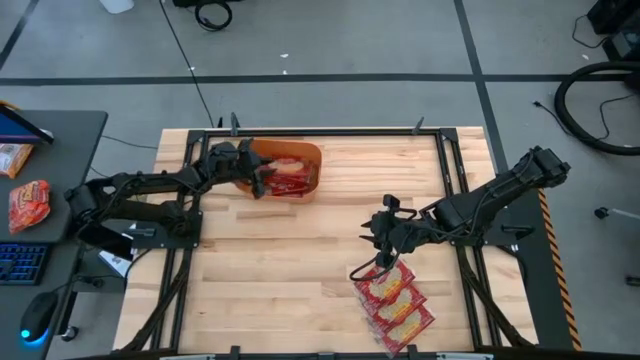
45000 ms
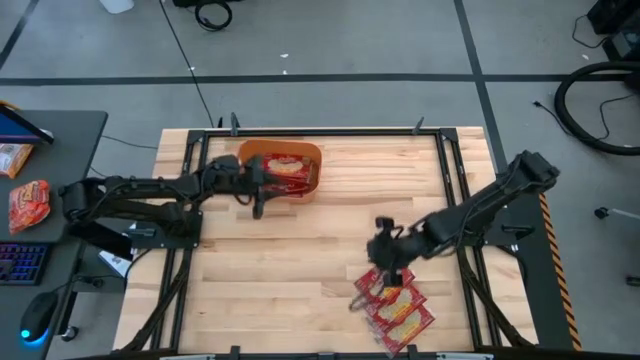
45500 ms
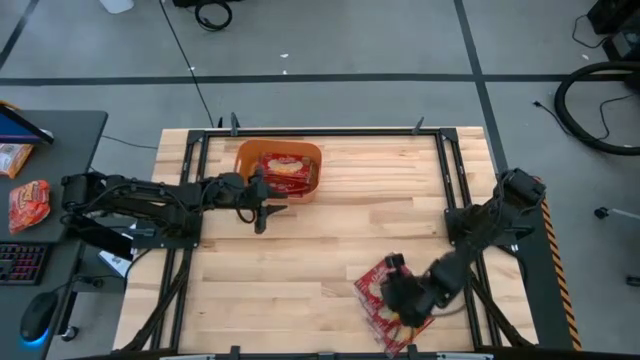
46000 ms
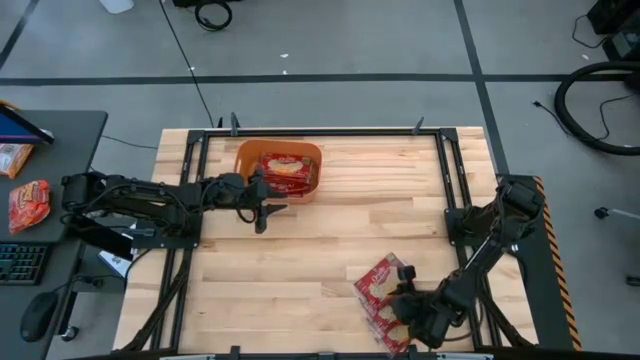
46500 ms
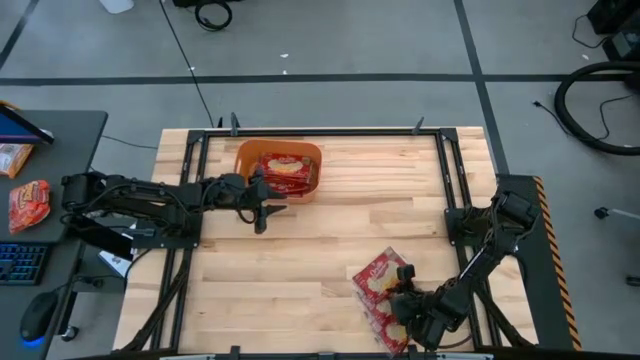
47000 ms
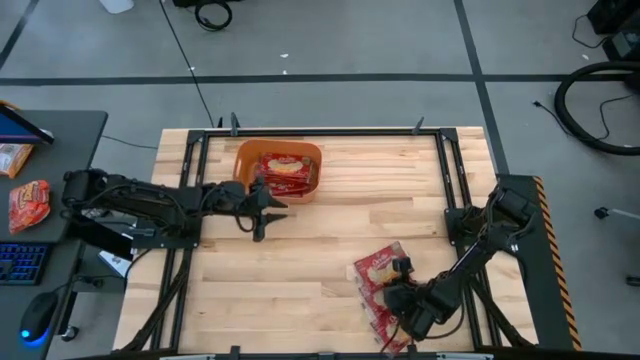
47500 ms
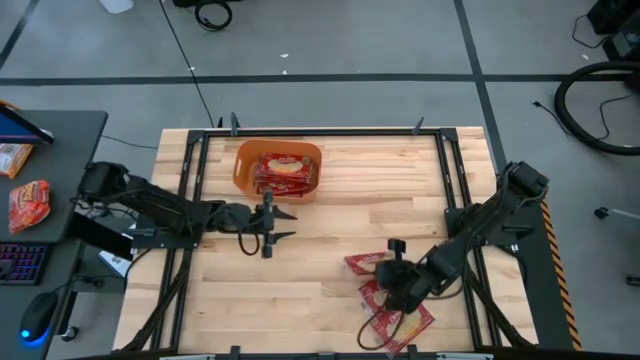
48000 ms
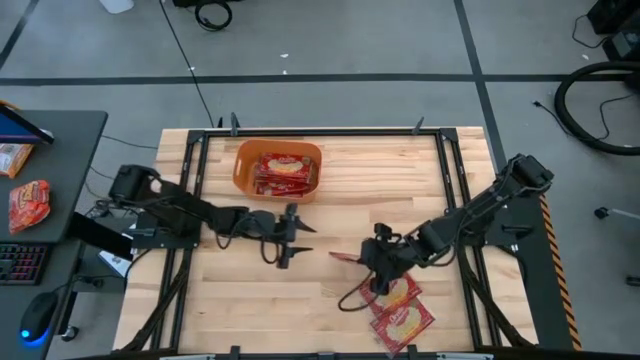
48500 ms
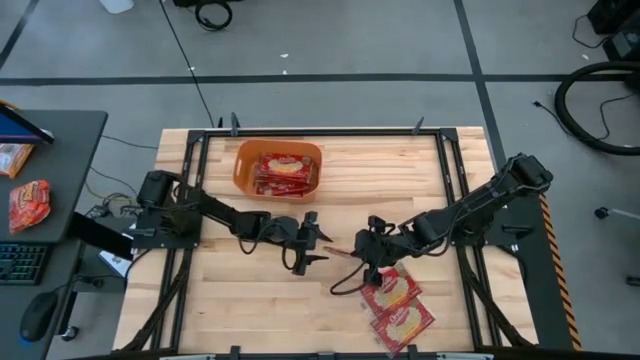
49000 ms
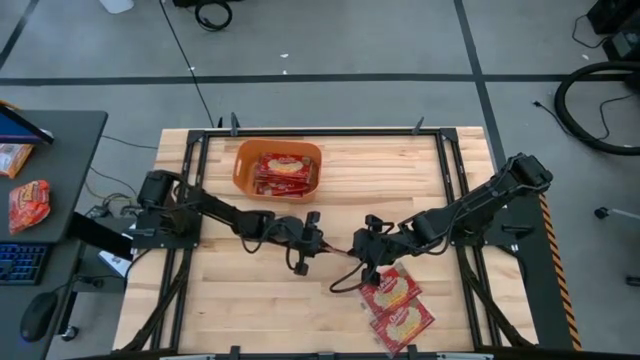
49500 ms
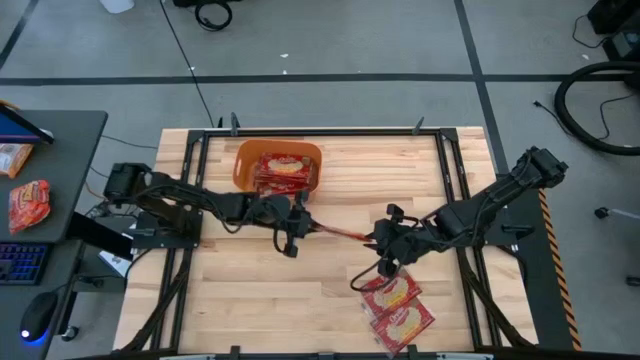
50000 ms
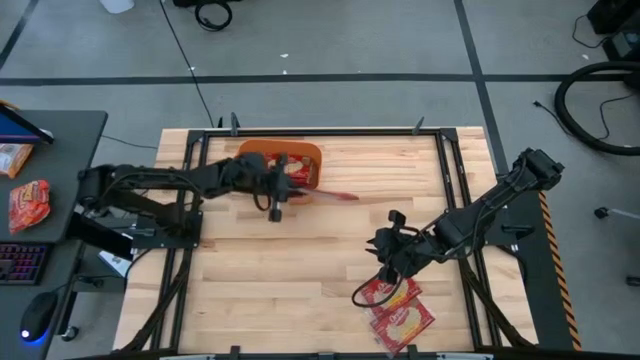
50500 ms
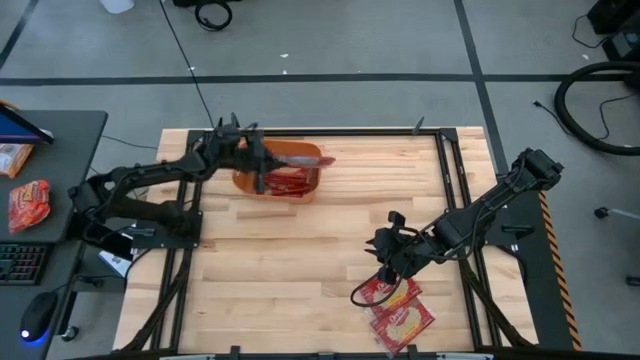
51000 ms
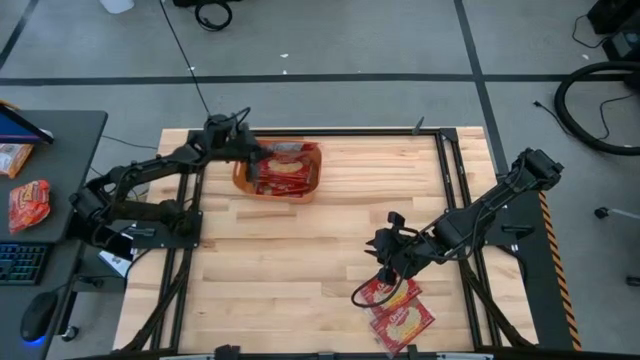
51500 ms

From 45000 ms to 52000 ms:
Task: Sort popcorn bags into baskets
Put the popcorn bag into the orange bin

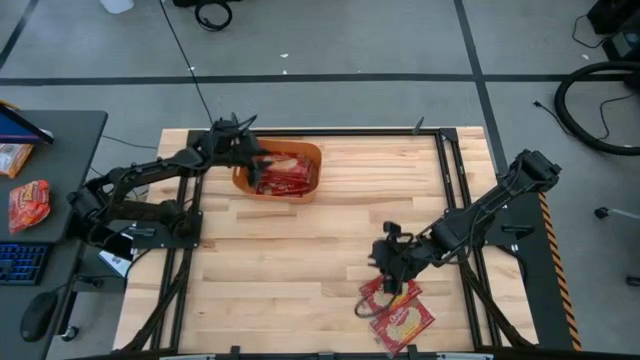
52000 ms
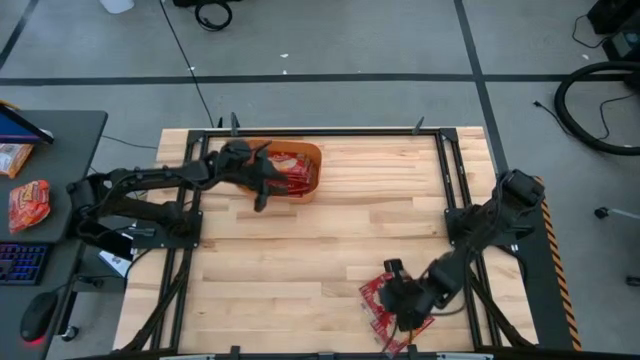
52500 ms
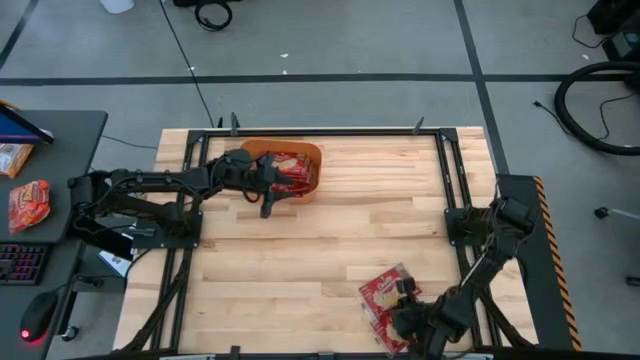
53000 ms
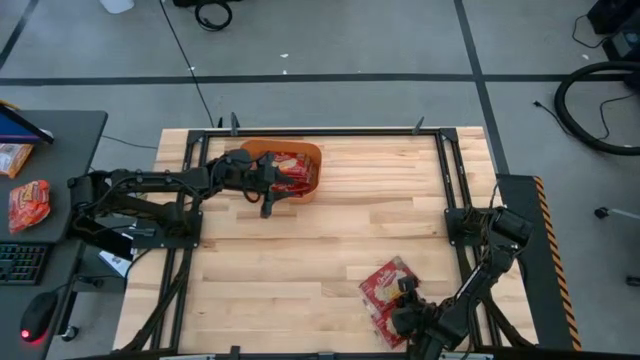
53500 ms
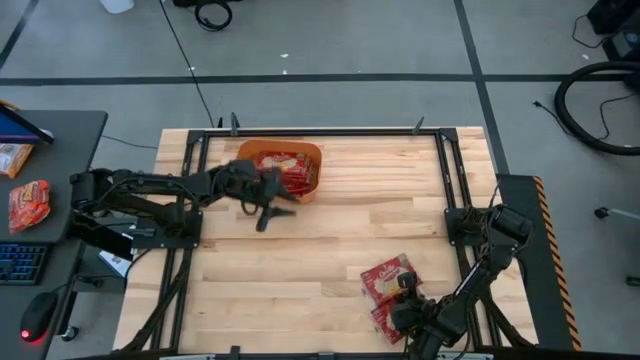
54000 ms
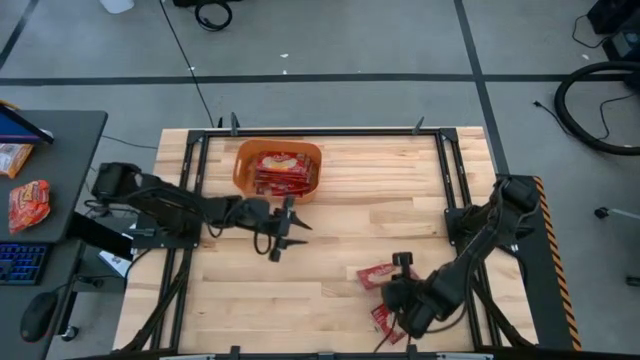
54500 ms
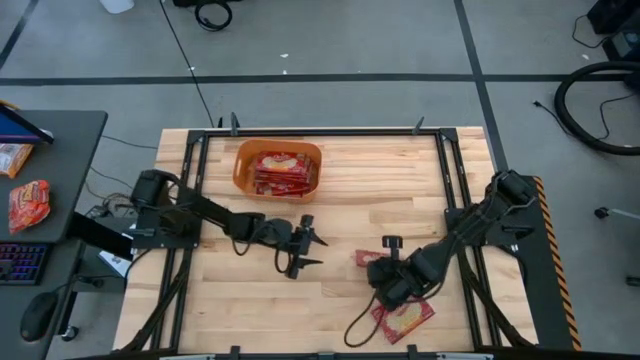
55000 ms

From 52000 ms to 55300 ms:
Put the popcorn bag into the orange bin

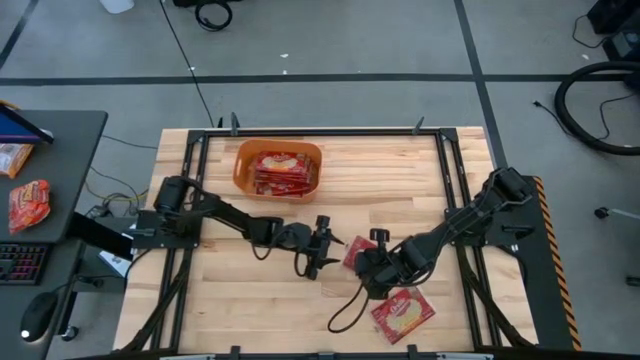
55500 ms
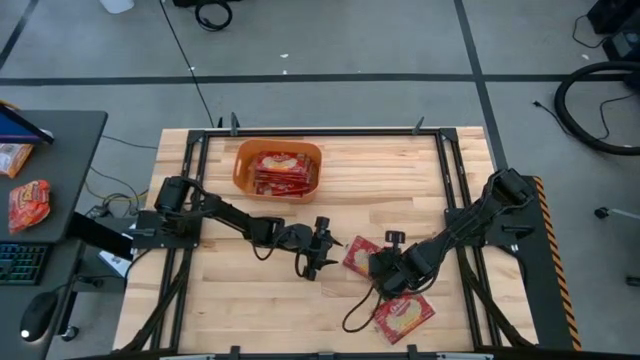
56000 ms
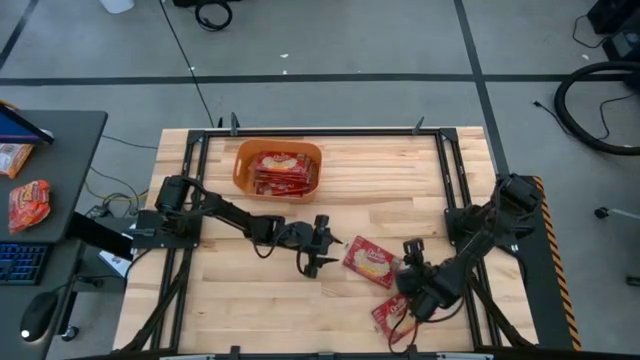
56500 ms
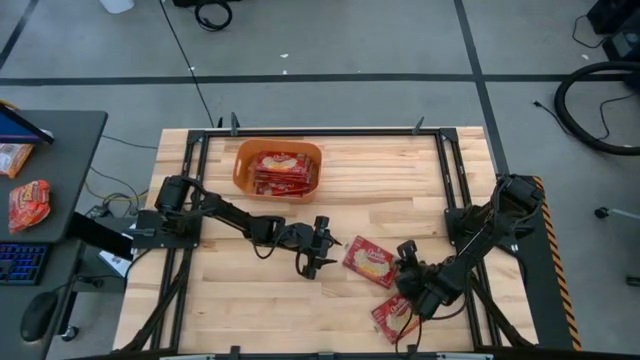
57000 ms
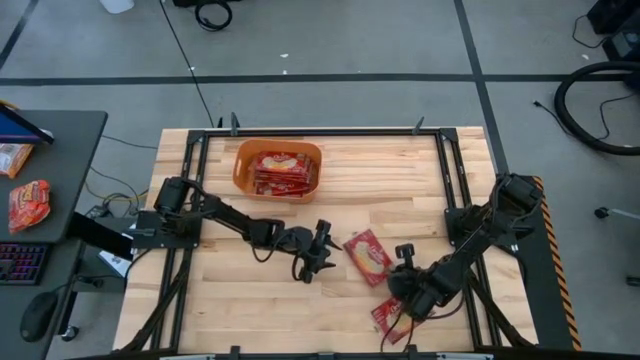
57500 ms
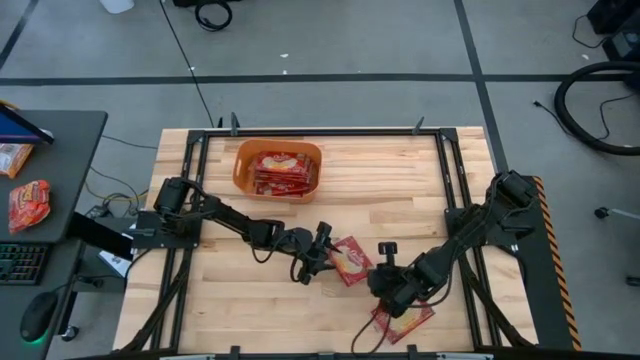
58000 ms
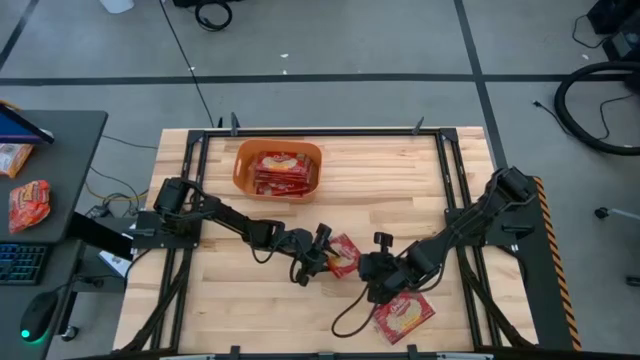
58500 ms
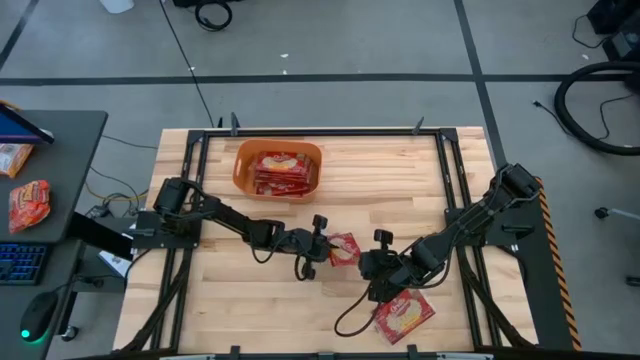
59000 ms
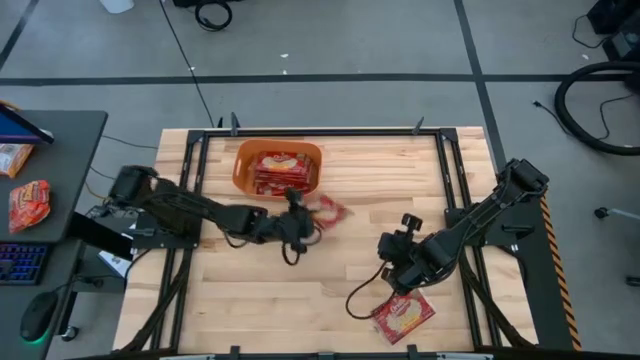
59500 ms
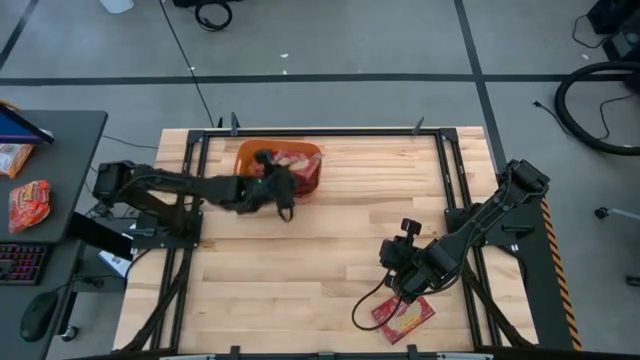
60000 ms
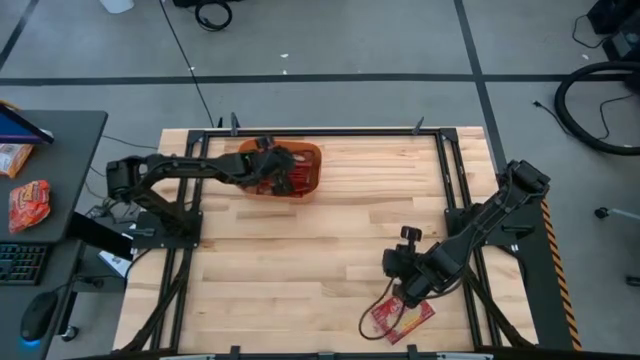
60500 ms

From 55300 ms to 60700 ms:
Put the popcorn bag into the orange bin

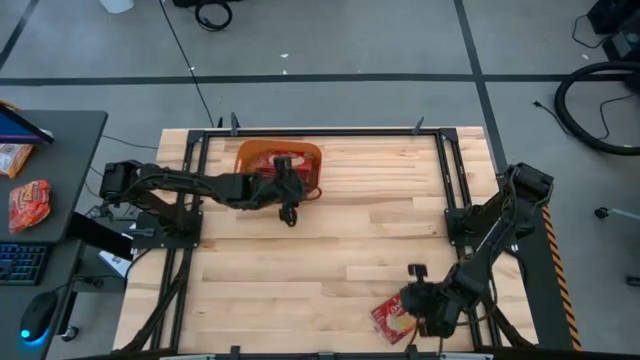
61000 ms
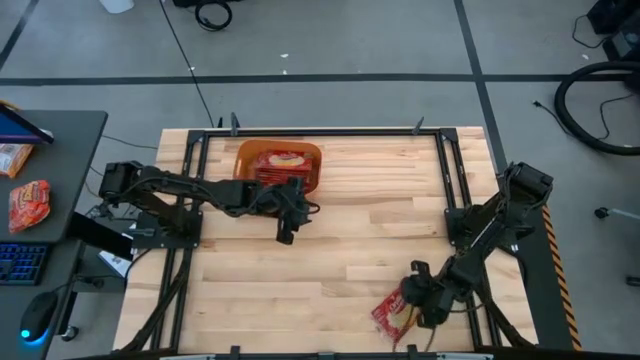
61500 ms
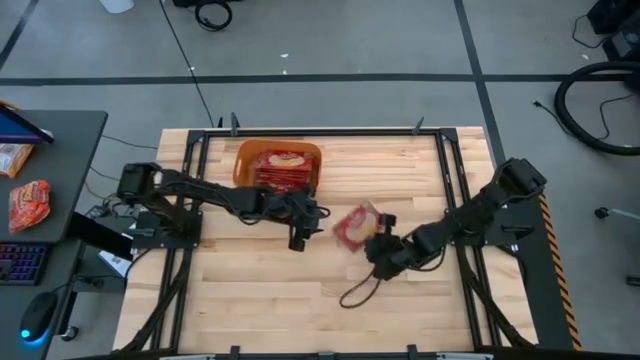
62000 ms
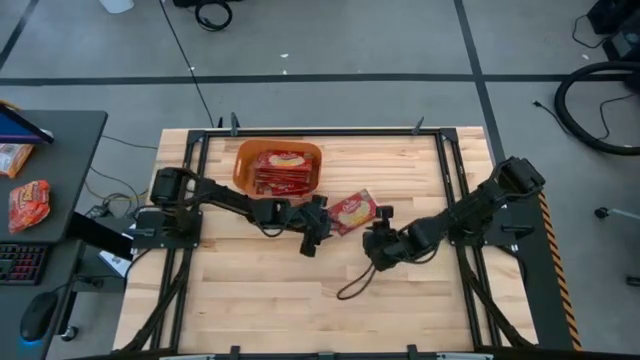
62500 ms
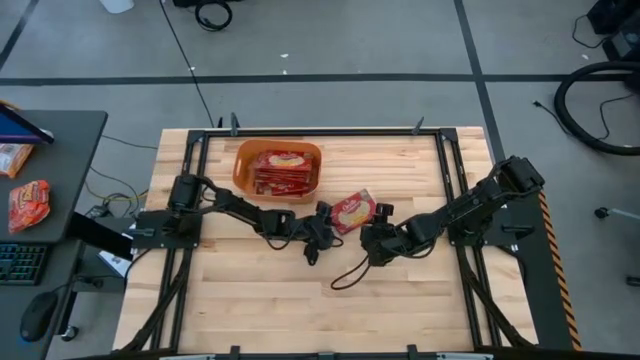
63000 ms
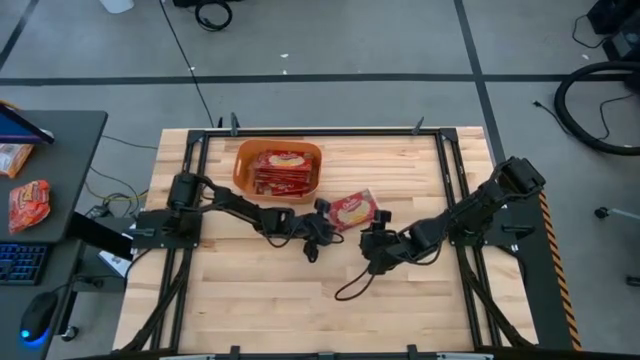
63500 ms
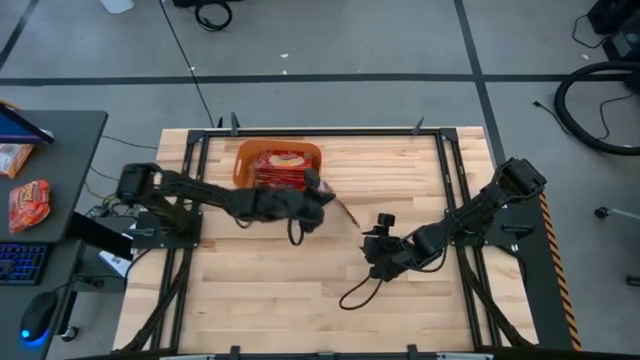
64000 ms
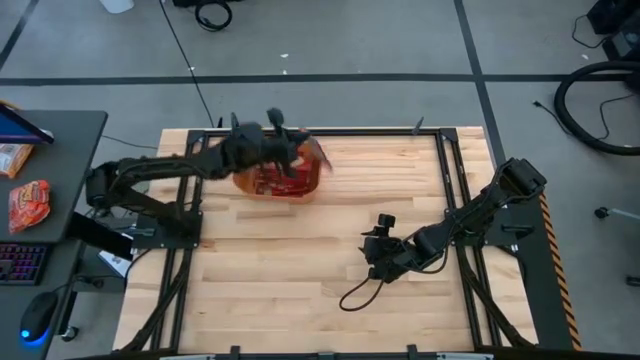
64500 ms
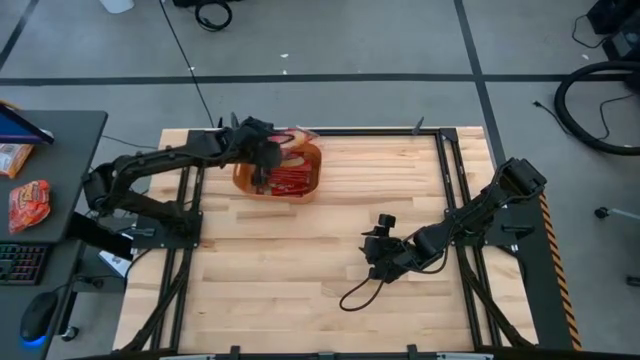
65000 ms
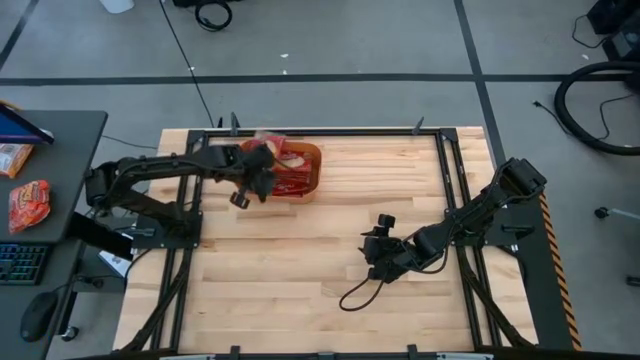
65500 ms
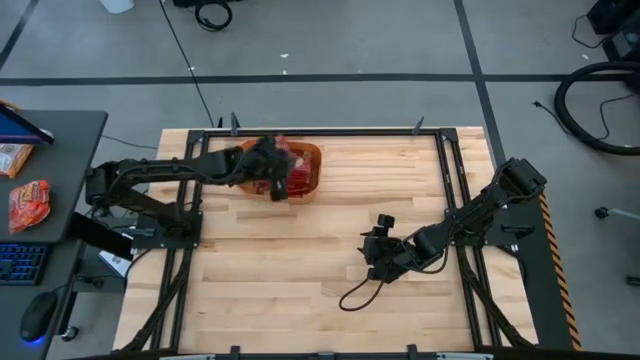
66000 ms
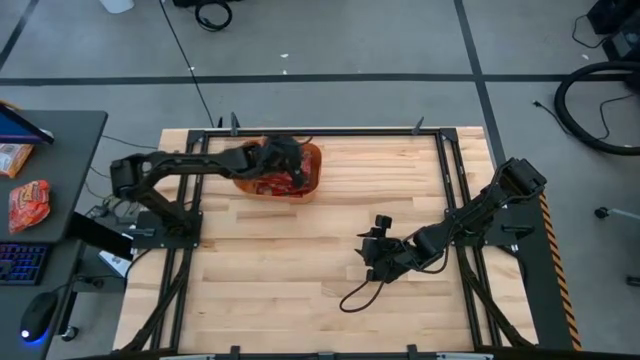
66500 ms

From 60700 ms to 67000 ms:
Put the popcorn bag into the orange bin
